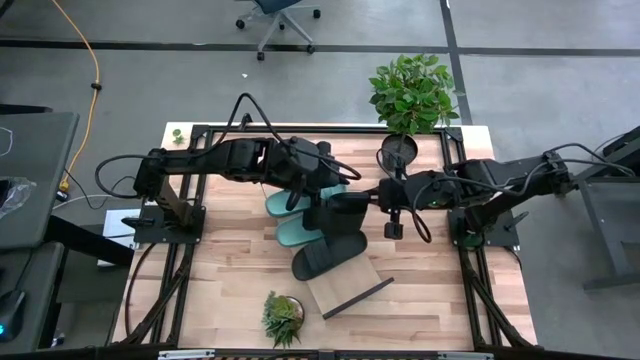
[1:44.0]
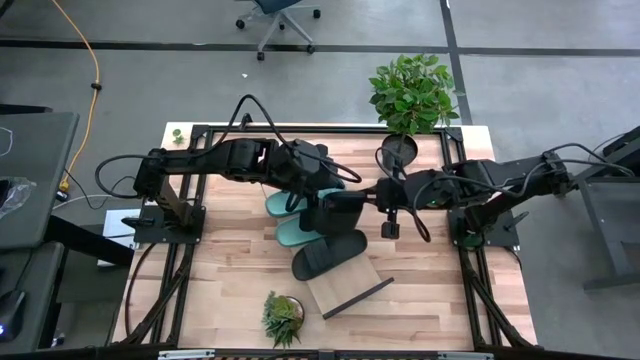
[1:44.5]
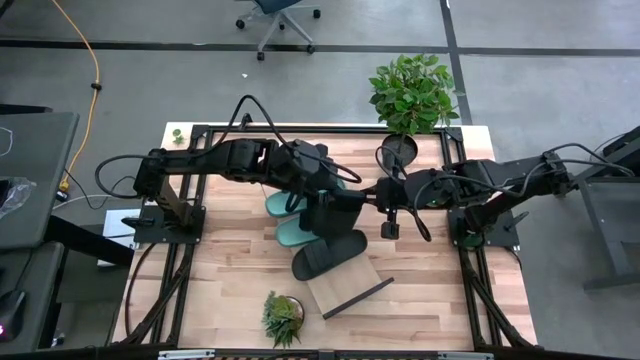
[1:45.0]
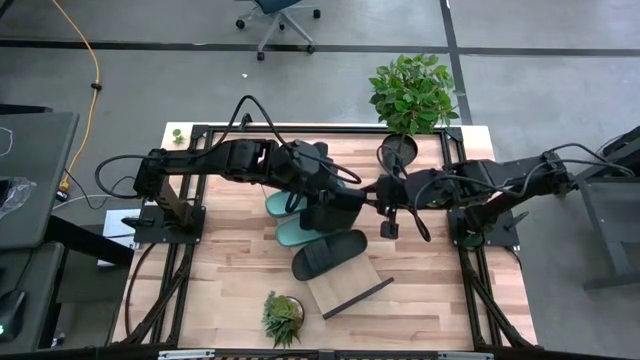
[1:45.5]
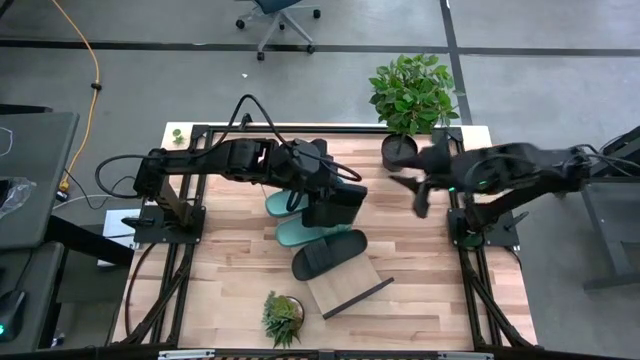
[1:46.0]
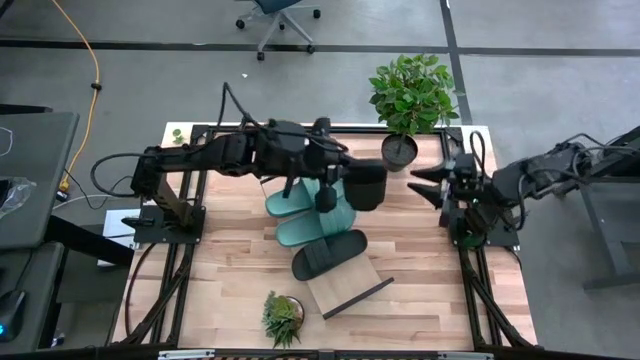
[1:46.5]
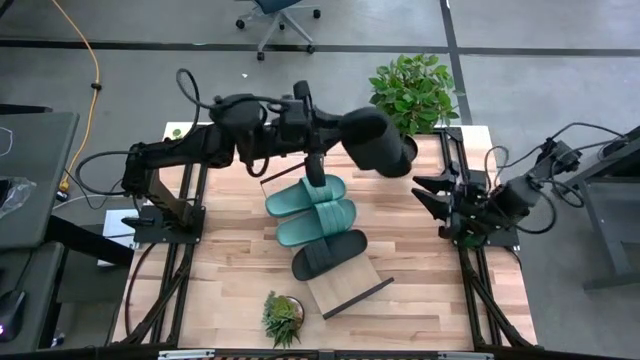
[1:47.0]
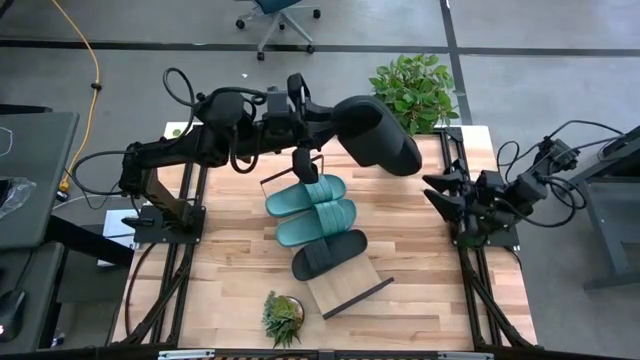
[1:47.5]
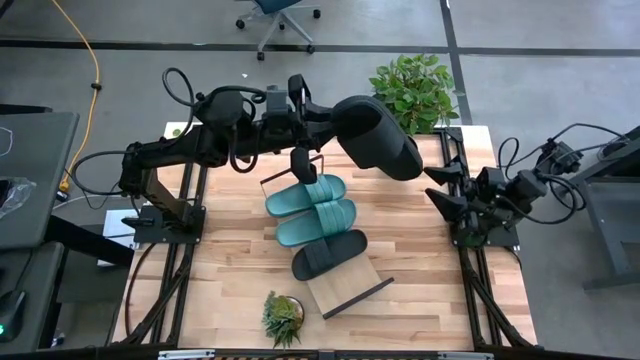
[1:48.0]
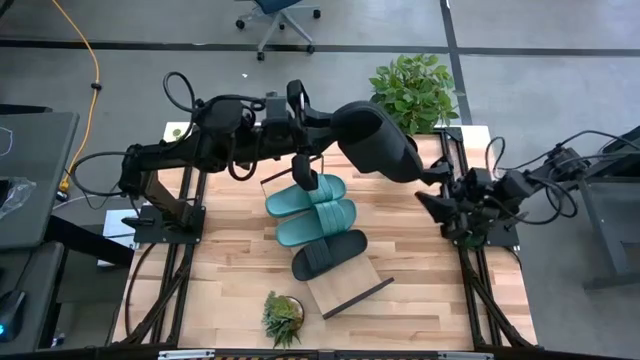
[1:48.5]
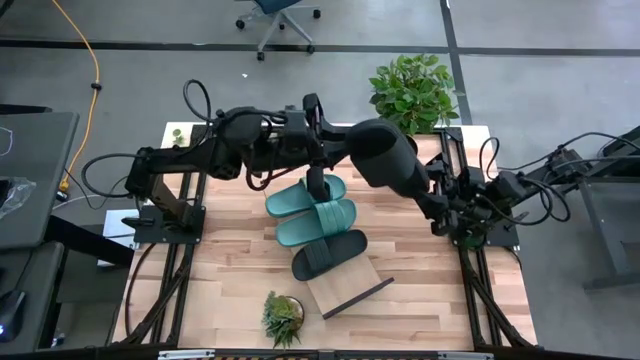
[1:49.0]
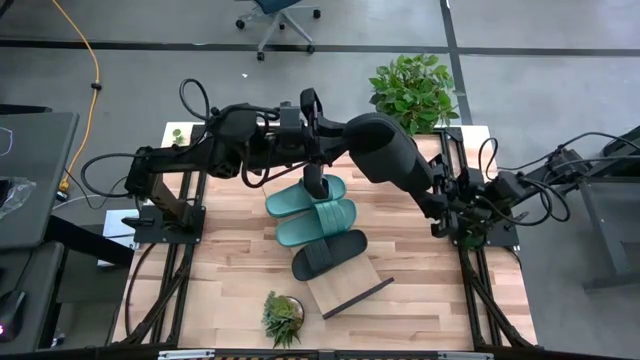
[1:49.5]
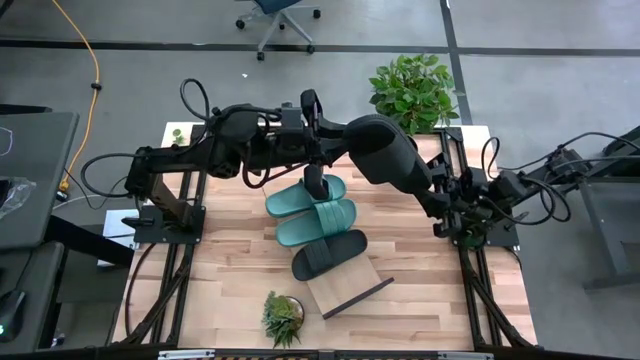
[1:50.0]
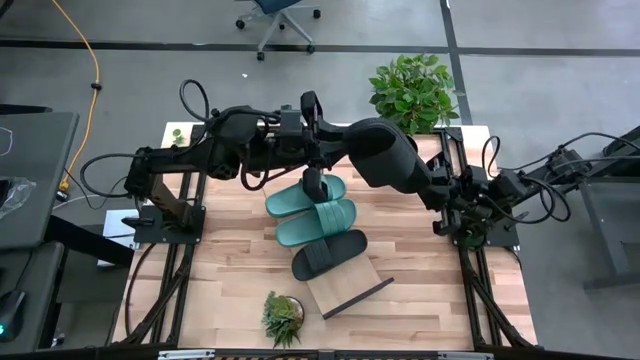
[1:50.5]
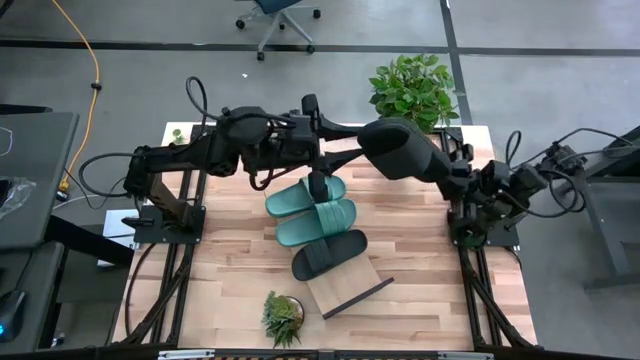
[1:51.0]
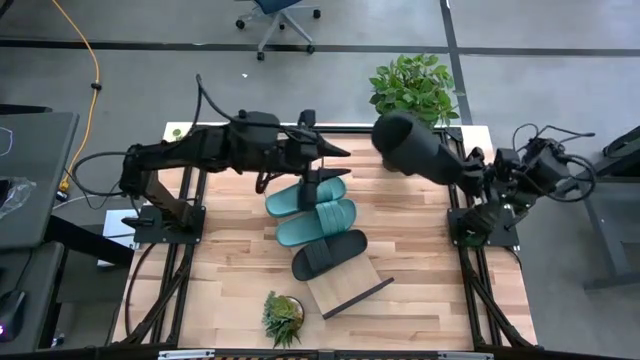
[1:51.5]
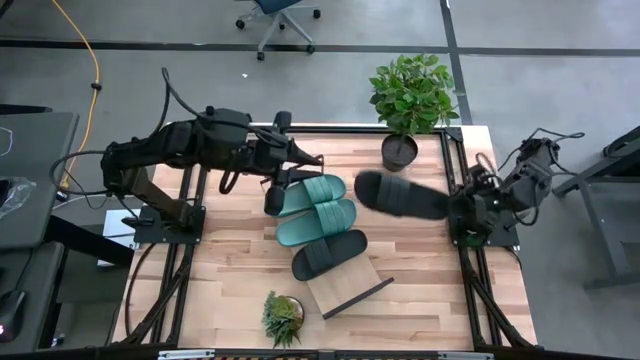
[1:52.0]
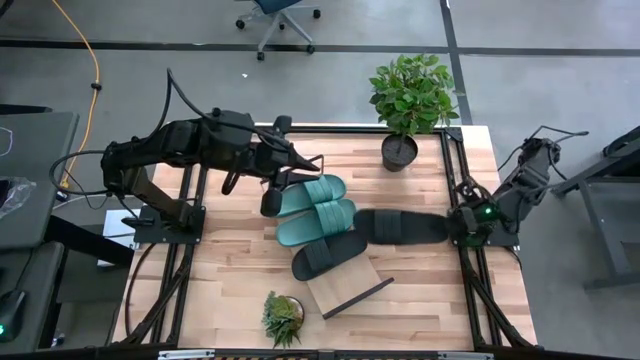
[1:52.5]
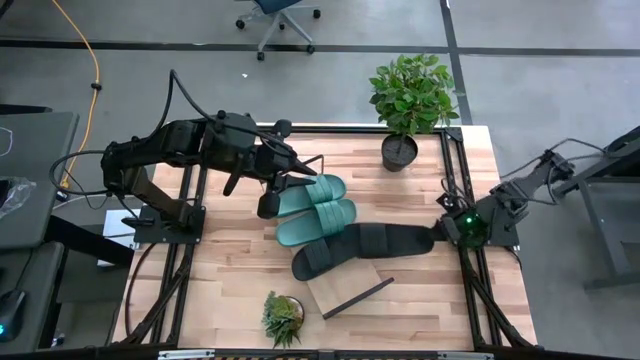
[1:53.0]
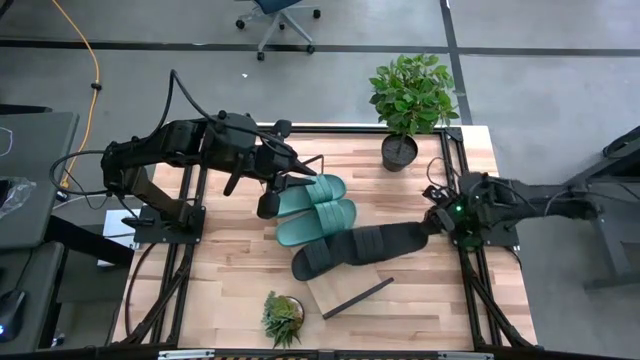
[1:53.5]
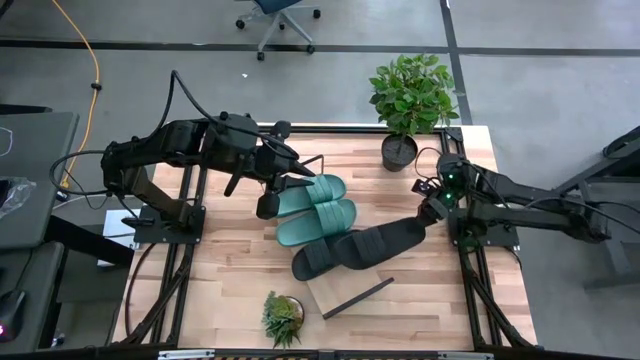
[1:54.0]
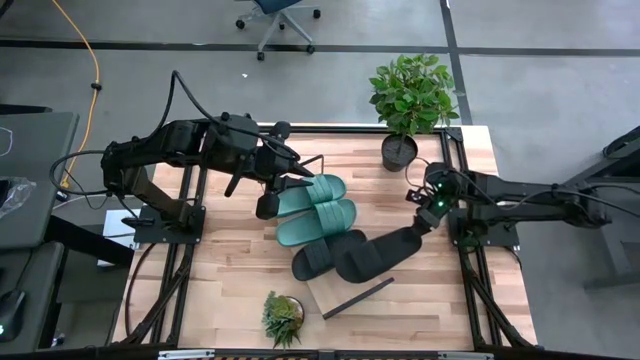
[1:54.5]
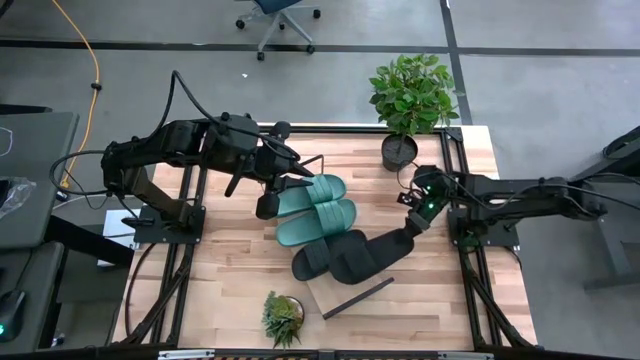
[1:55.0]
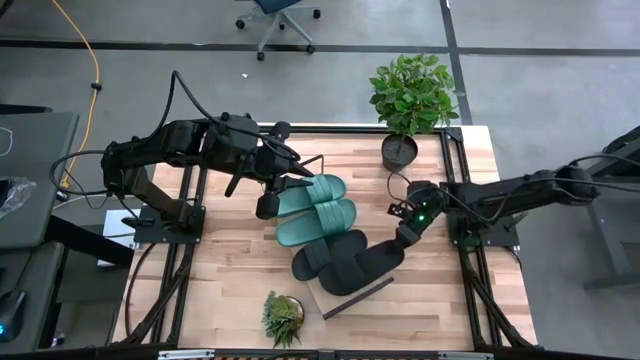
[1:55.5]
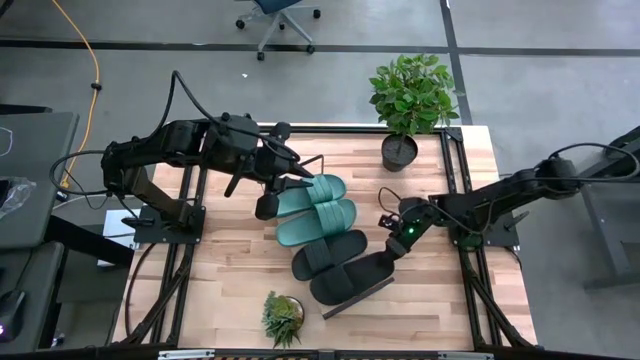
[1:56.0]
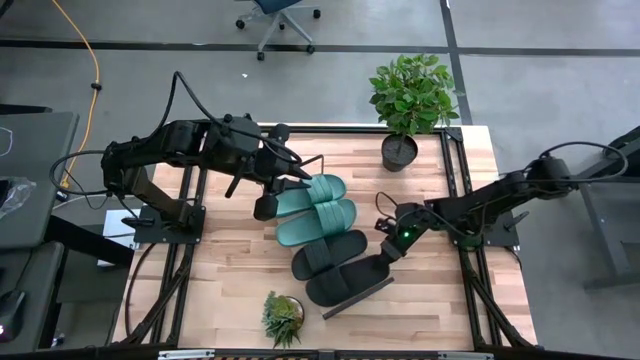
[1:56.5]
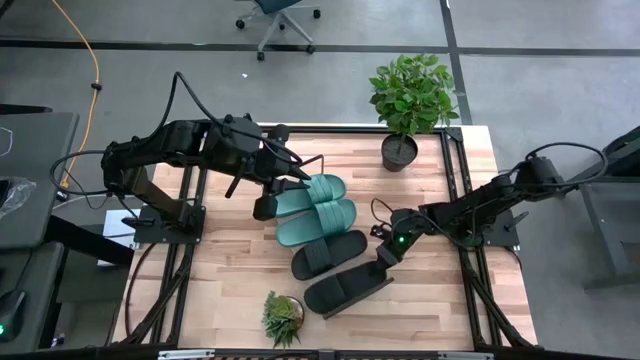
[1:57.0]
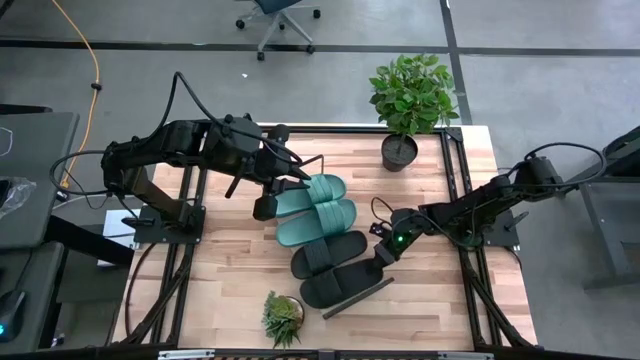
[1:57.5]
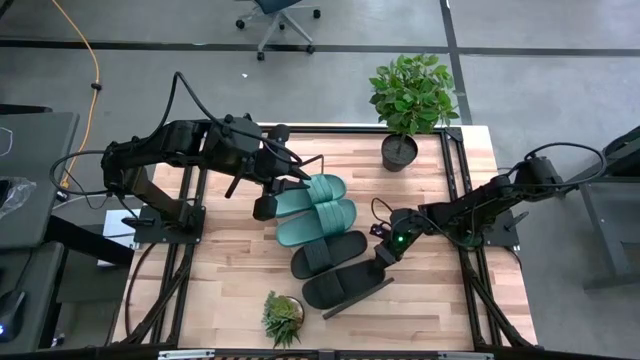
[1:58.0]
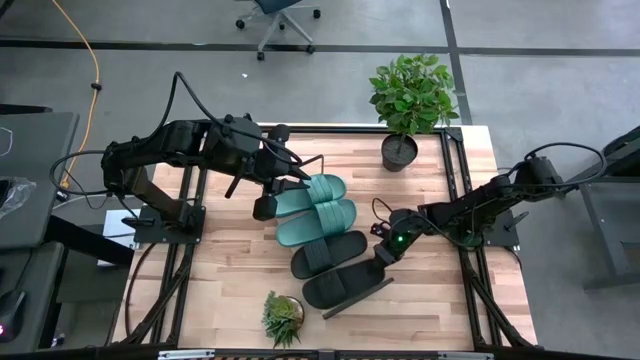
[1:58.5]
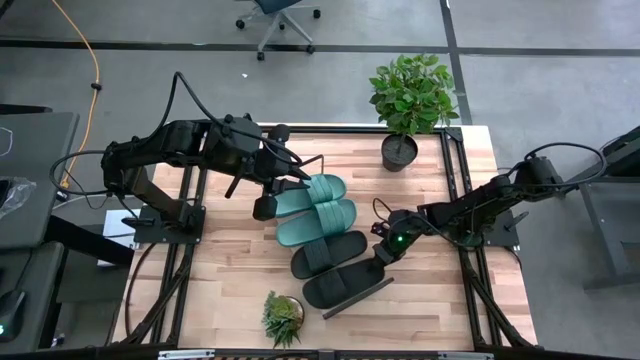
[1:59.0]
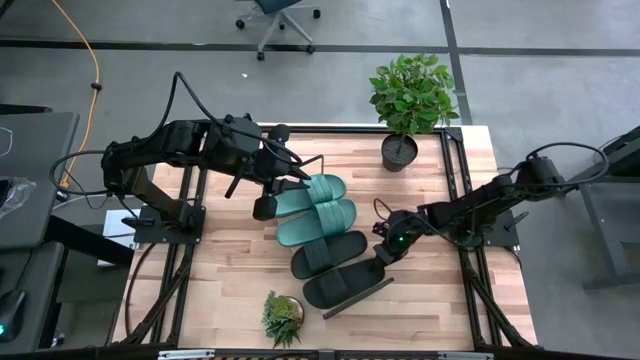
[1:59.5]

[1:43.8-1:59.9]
Task: Pick and place slides into the shelf
Put the black slide on the shelf
